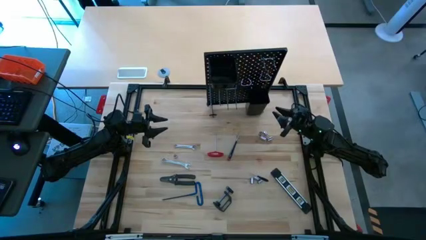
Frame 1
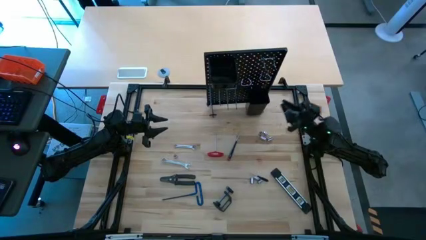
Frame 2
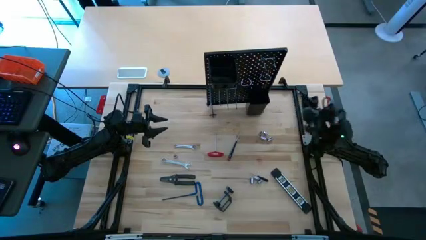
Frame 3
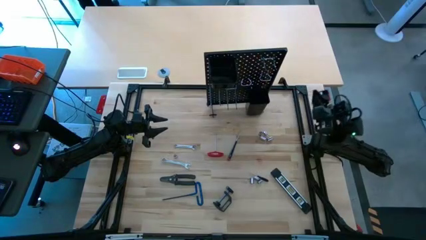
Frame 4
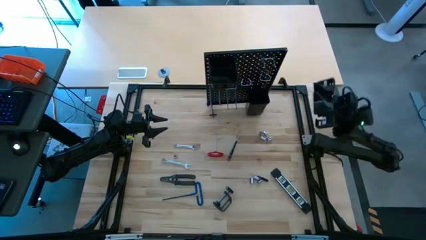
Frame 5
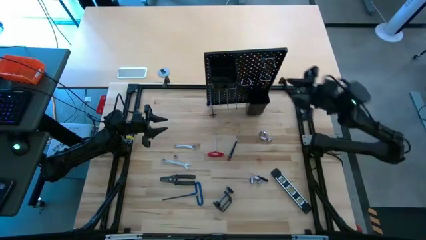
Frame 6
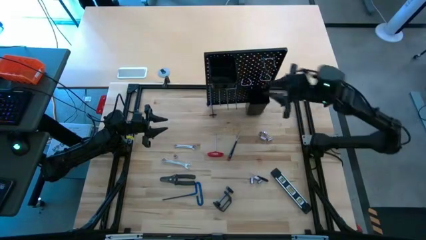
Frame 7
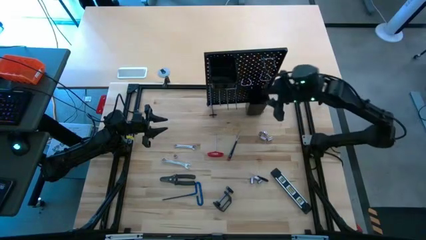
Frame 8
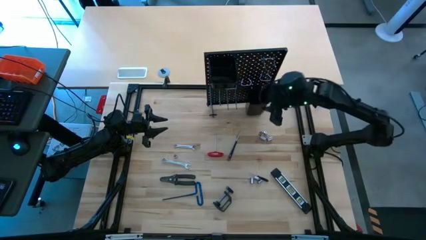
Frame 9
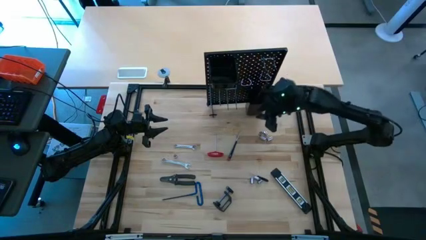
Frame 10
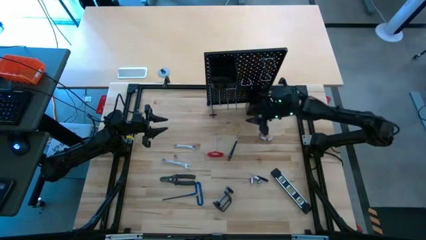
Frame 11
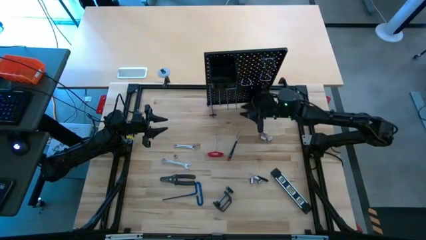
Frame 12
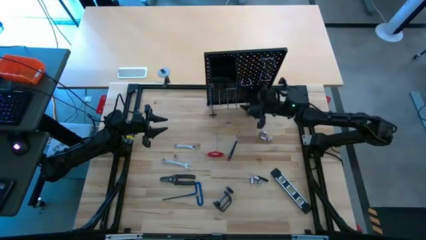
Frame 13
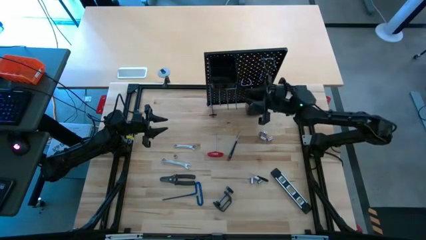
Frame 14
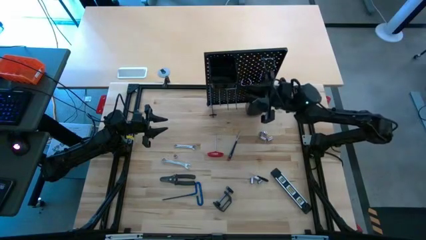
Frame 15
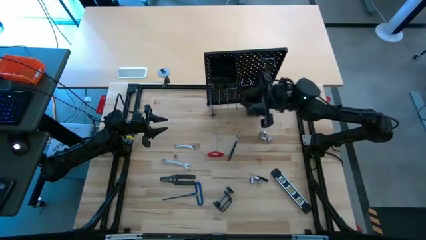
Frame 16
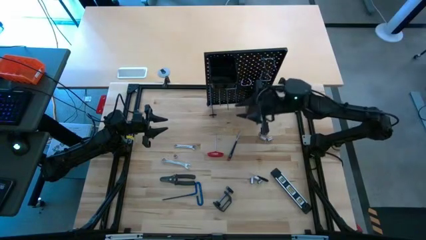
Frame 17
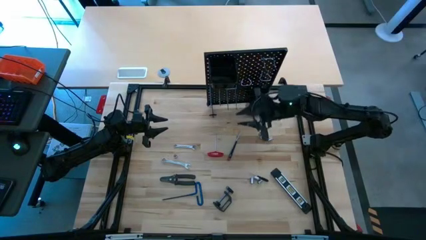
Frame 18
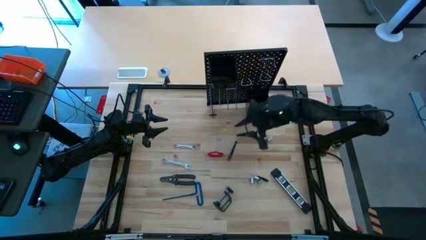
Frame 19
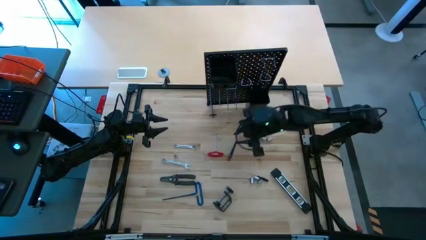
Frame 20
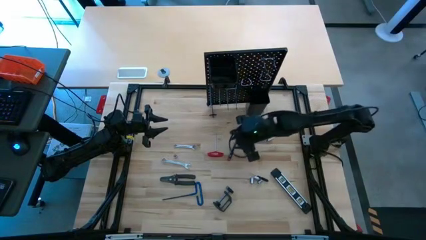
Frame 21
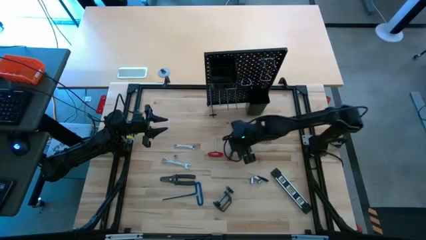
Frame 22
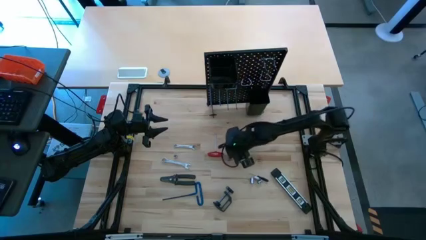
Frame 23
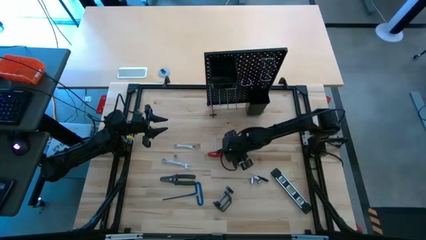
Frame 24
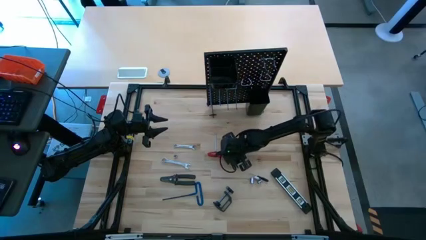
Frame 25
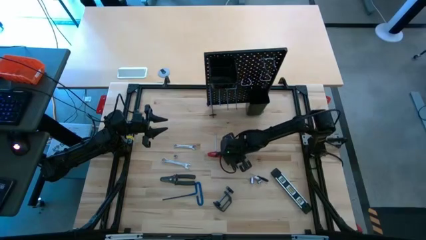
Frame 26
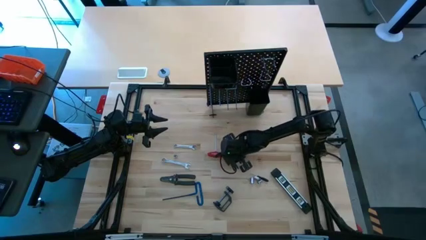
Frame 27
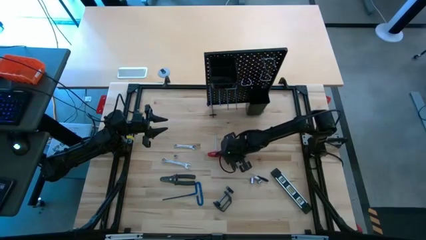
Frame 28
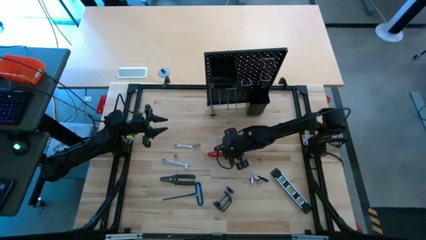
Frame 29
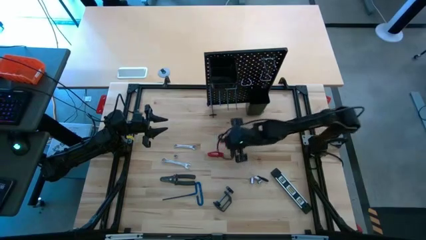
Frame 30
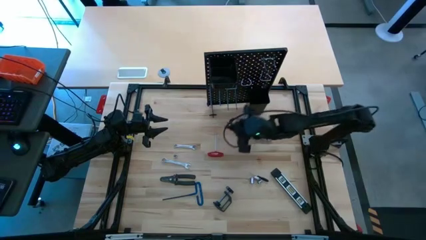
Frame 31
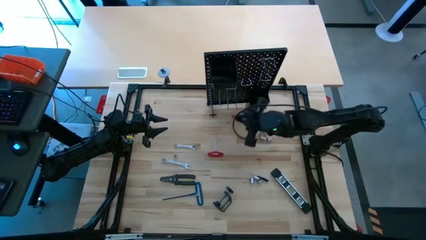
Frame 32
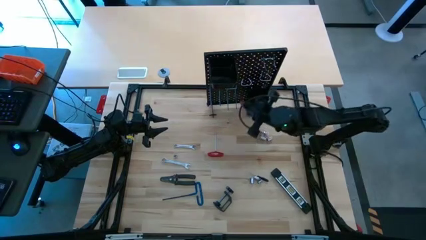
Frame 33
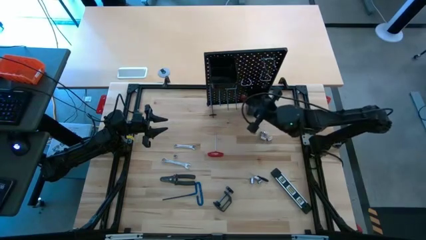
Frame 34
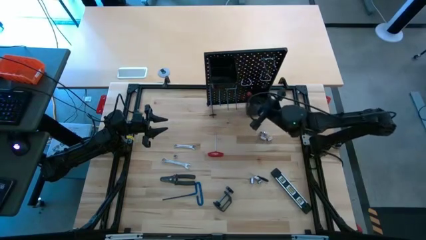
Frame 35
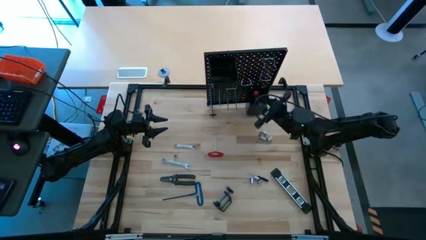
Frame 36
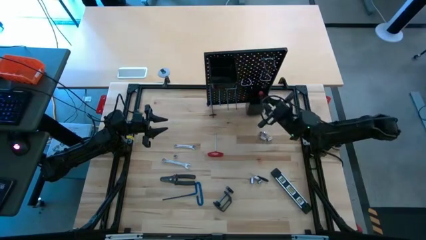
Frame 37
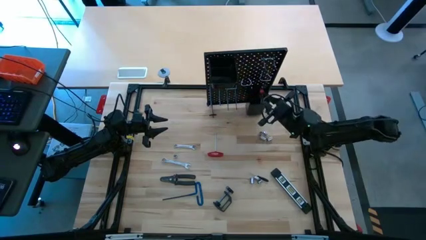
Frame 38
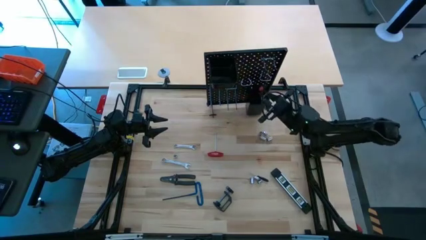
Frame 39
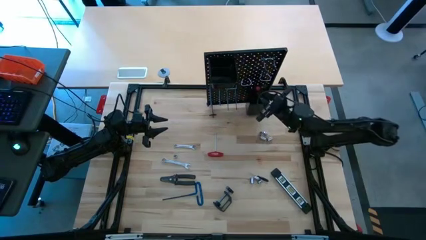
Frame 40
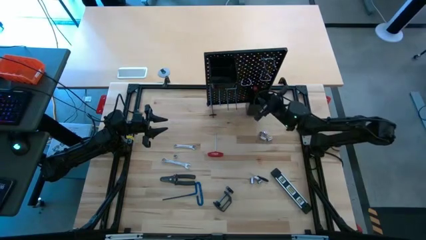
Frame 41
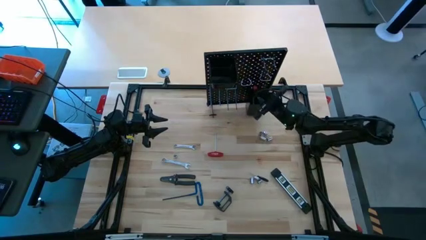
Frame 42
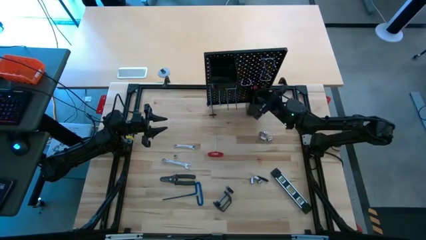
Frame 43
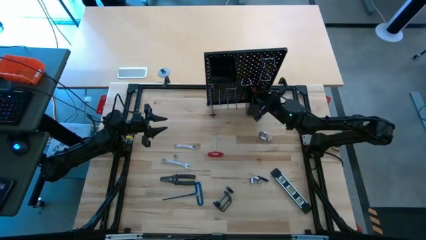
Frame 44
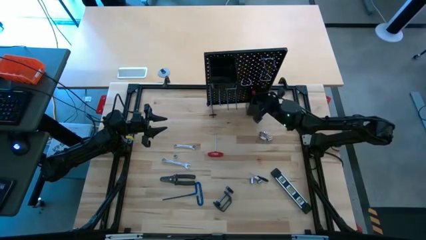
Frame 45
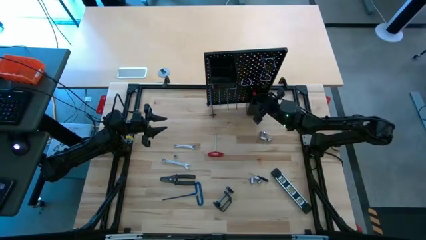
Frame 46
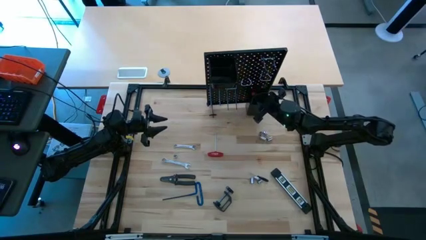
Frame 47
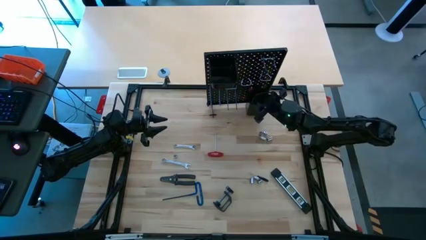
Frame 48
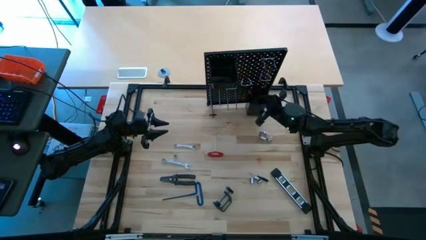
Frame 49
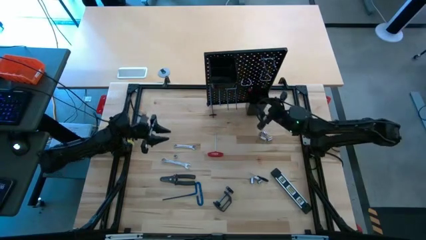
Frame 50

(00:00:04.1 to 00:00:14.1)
Task: Hang tools onto peg board
Put the black nut driver into the bottom black bin on the peg board

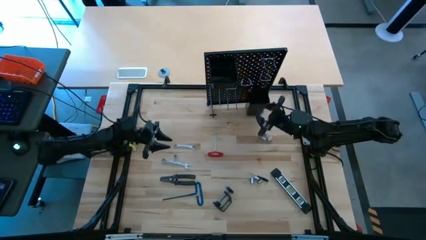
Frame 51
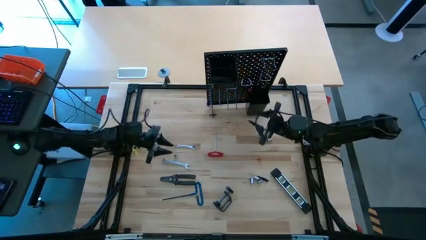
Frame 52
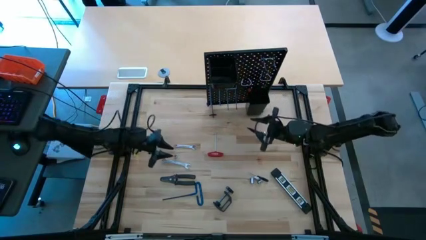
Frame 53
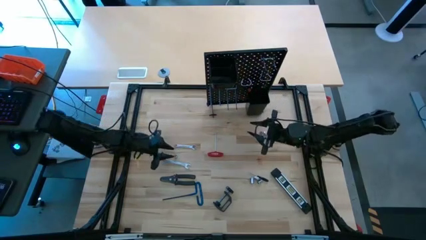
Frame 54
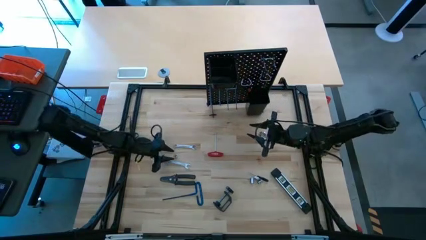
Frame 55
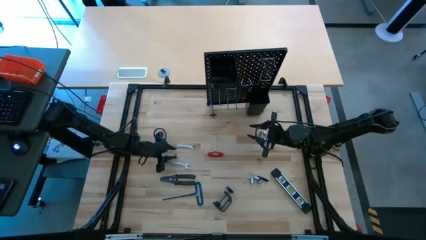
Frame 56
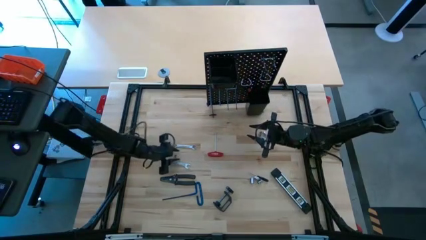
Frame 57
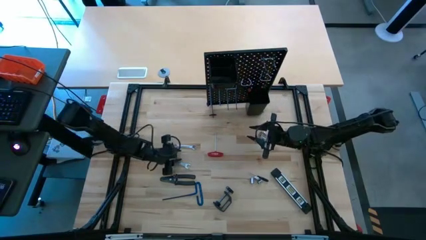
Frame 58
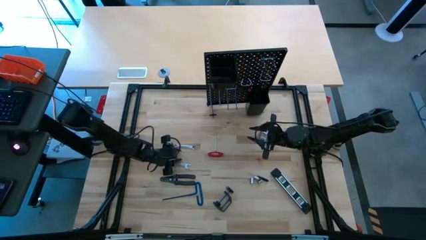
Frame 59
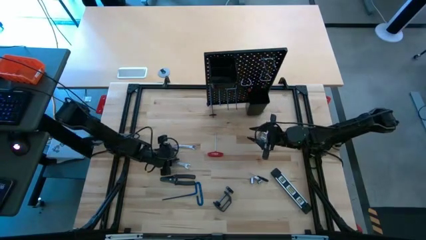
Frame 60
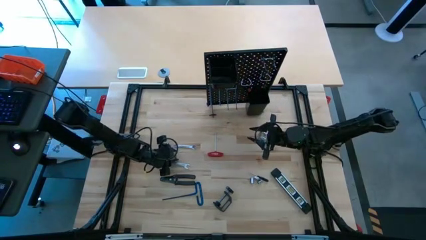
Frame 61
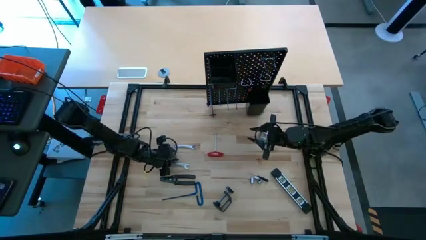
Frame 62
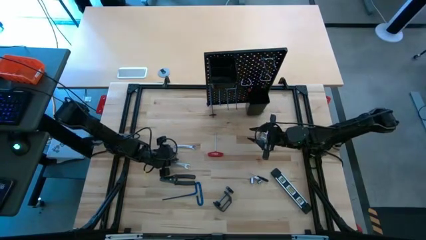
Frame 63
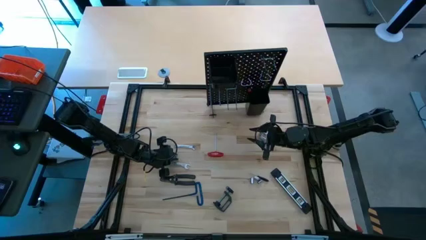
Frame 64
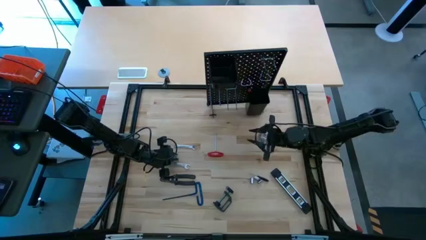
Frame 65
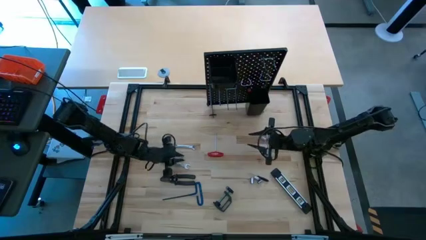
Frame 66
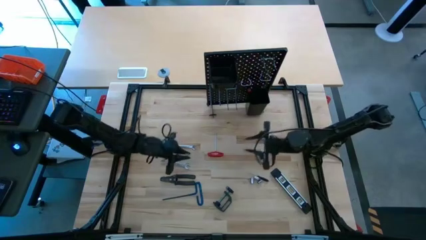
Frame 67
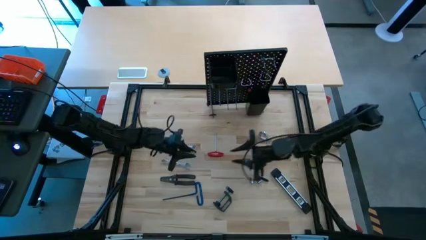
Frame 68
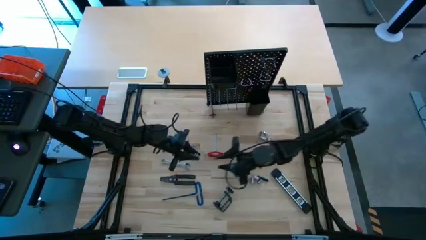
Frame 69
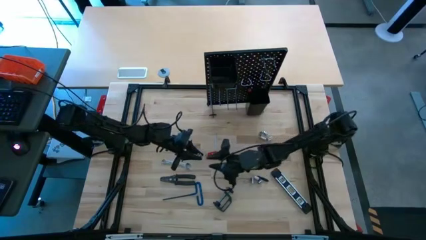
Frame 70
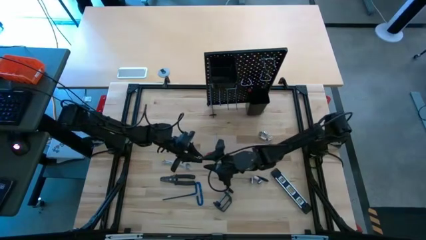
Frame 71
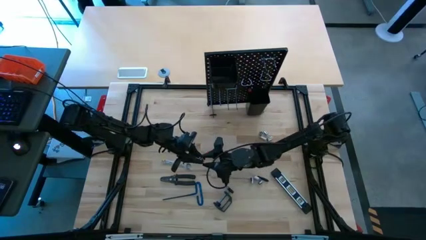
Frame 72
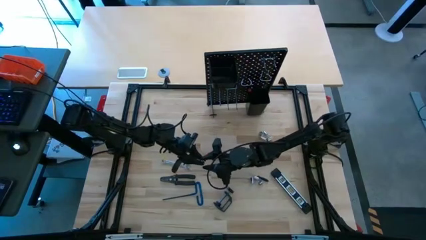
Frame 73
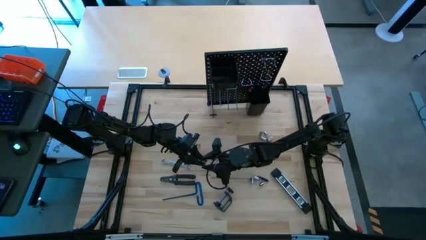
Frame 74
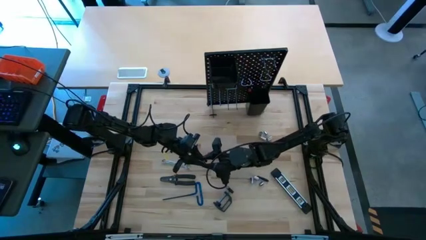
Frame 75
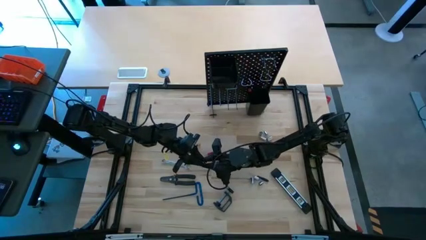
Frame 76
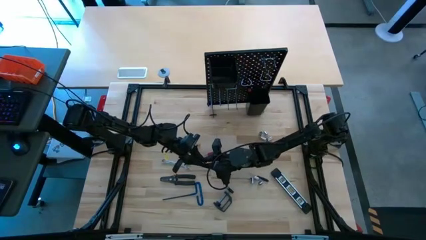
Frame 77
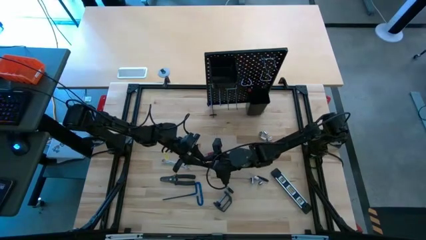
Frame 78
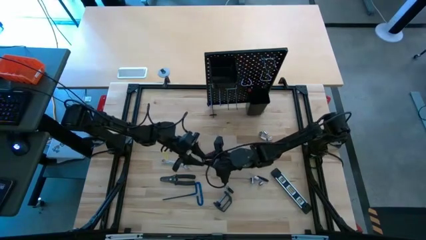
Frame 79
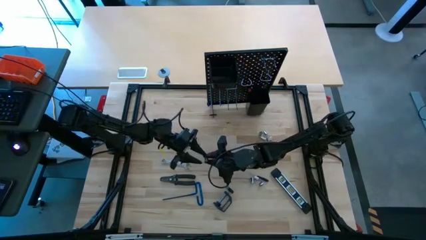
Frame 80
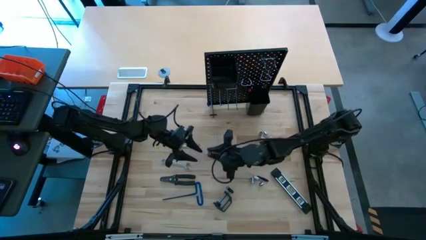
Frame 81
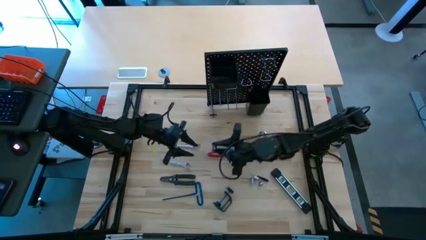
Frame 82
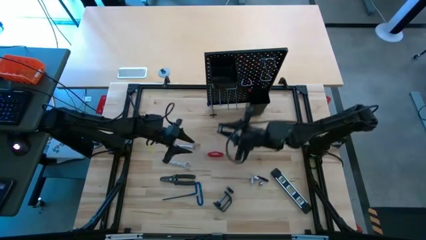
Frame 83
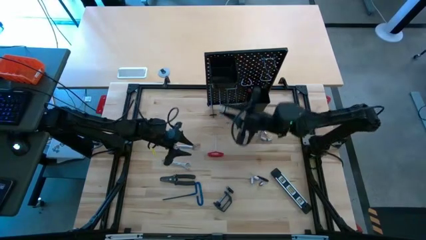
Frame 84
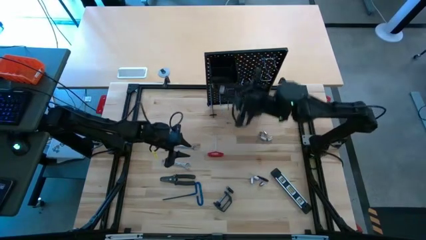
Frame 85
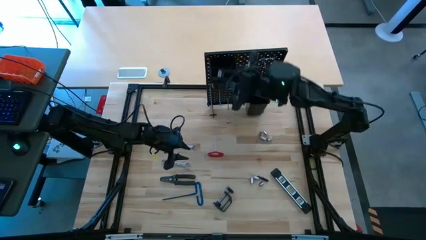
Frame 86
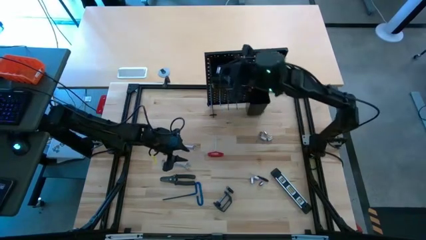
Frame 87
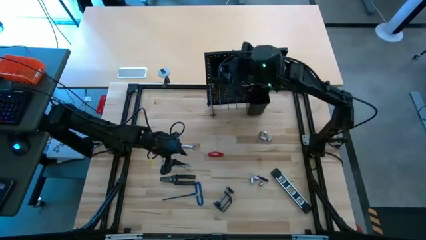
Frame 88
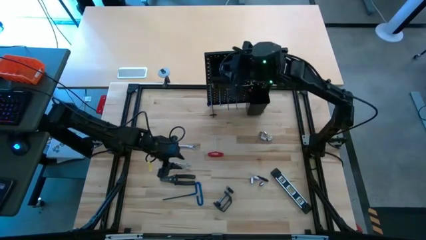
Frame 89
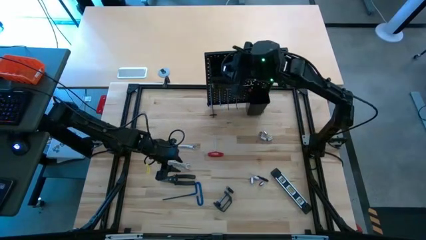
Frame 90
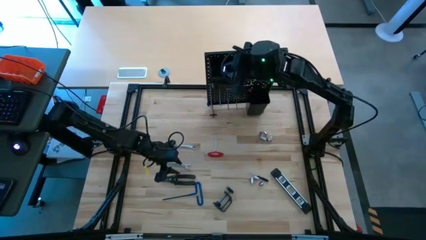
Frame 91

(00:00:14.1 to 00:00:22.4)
Put the silver socket into the top black bin on the peg board
